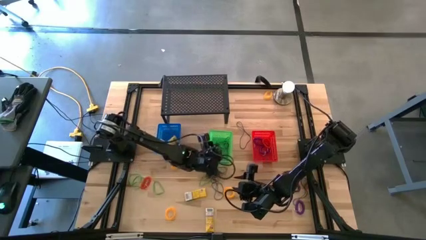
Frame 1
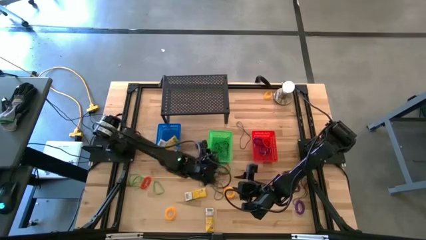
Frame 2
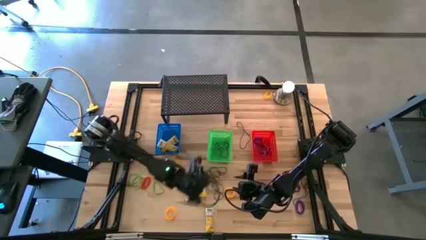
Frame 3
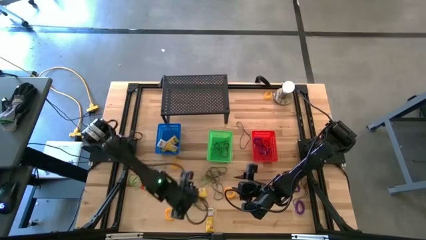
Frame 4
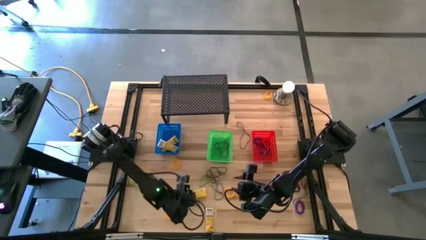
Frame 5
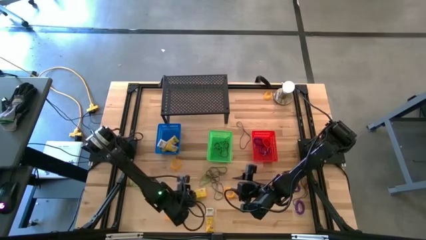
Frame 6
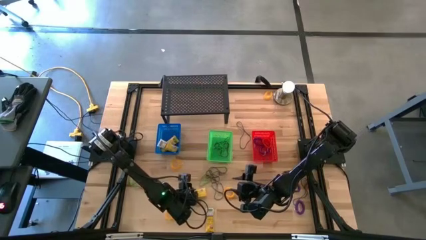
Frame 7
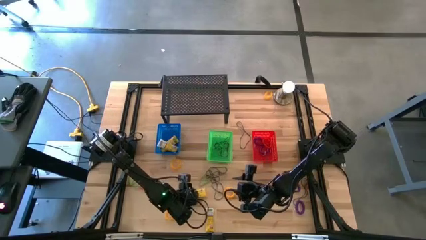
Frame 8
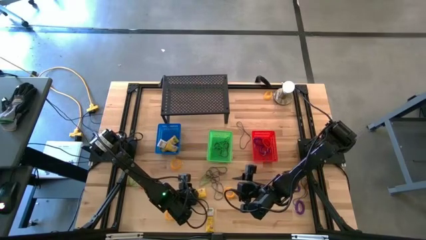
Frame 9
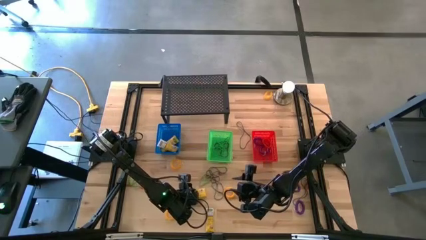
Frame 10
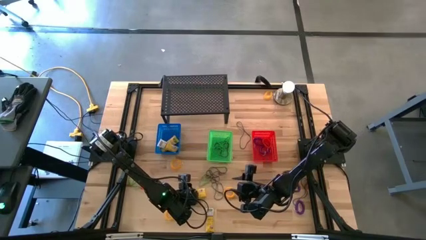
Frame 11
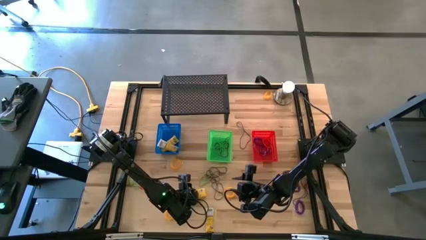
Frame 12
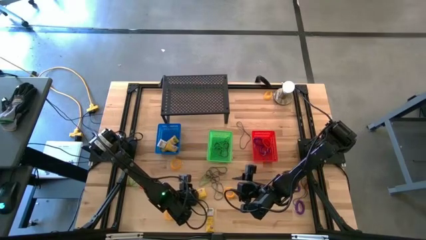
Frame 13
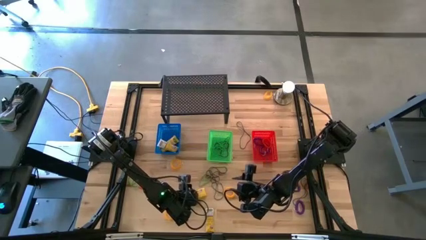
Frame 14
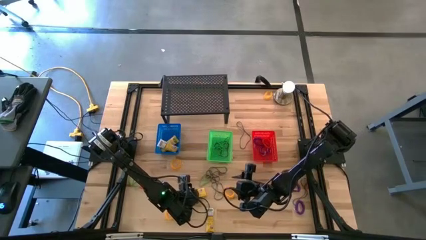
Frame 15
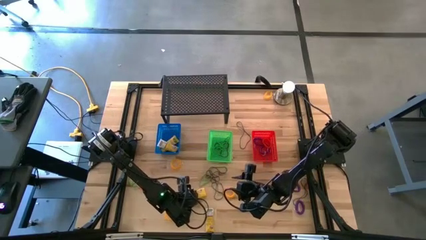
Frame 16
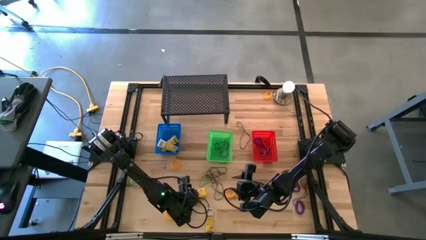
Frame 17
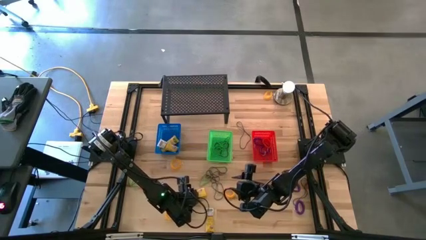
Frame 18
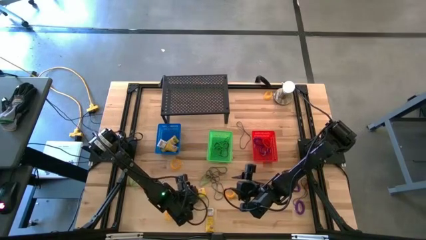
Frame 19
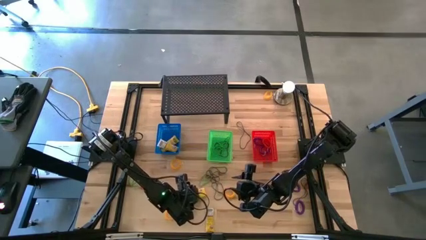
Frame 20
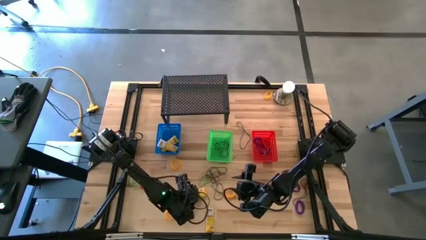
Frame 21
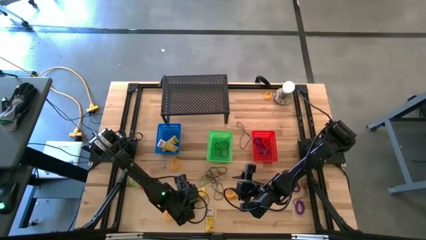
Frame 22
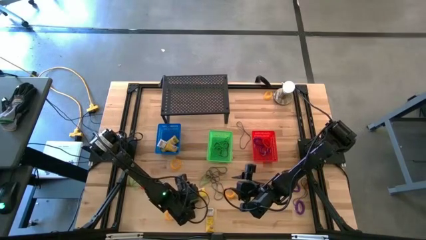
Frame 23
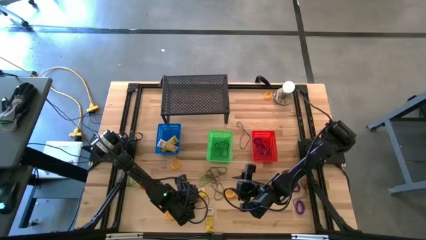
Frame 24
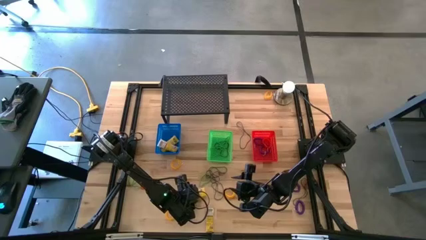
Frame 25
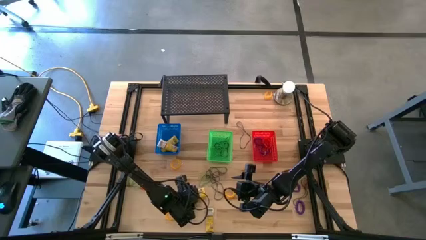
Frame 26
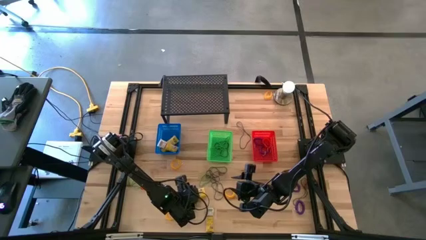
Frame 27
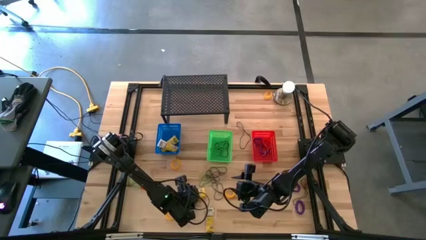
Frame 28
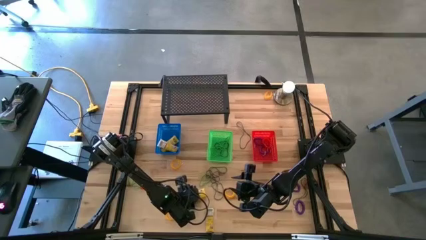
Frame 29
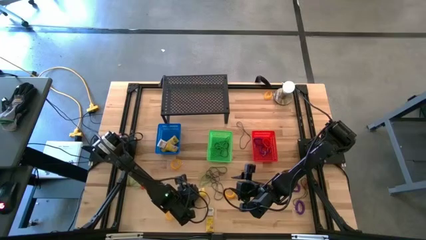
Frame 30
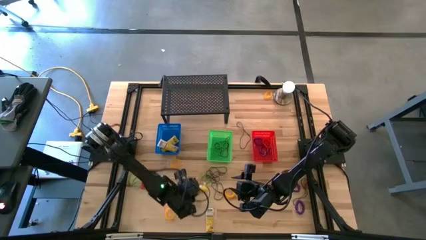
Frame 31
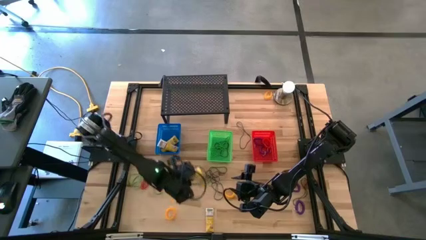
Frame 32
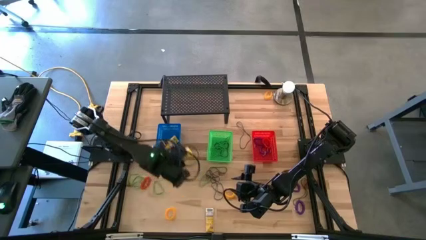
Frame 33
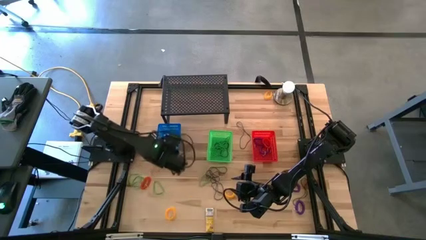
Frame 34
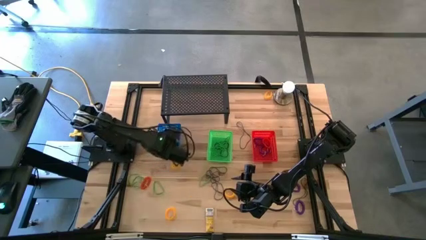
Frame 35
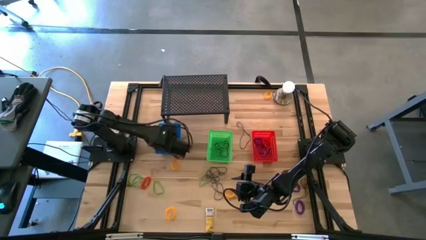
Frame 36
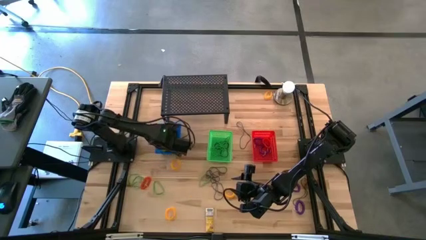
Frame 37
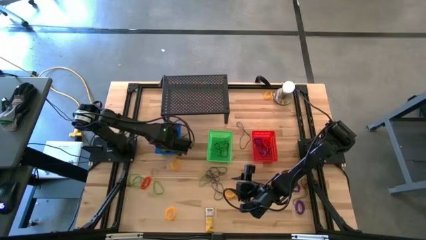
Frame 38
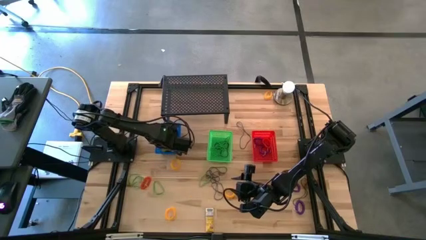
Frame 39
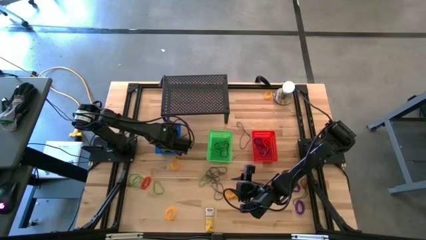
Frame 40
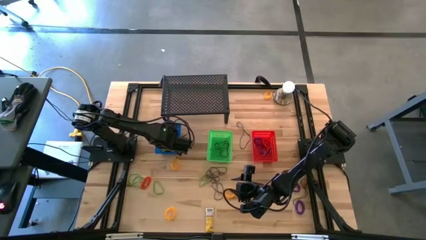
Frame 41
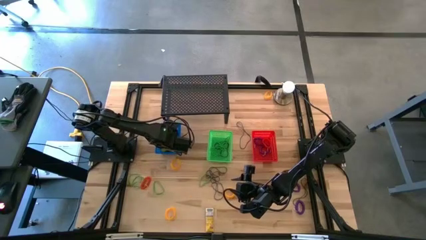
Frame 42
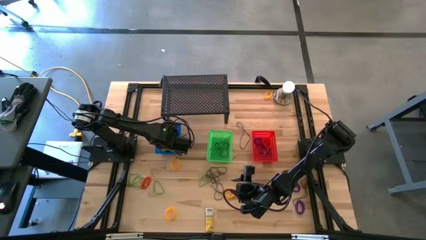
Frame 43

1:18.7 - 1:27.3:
Task: Pick & Place Office Desk Supplies
Put the crayon box into the blue bin

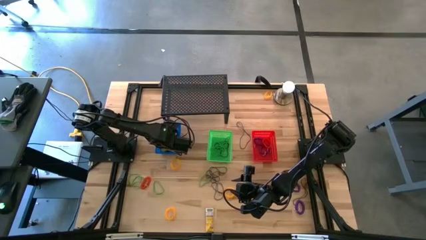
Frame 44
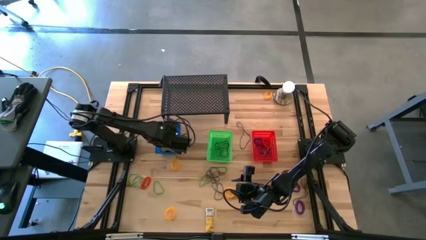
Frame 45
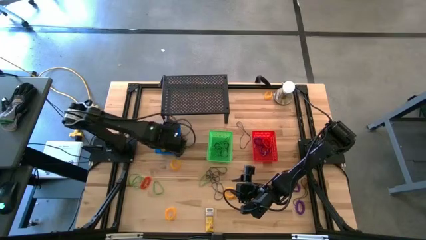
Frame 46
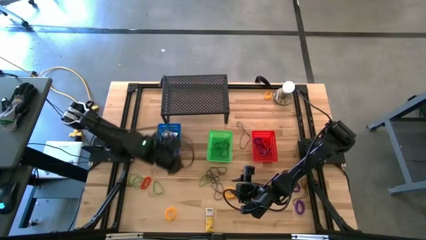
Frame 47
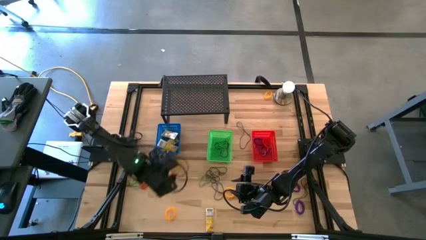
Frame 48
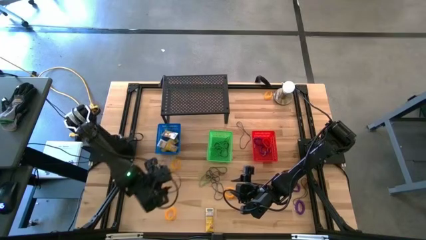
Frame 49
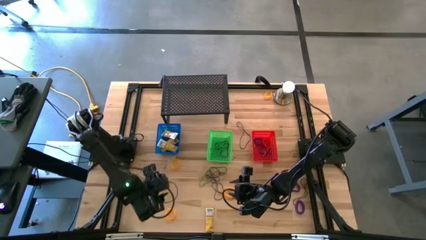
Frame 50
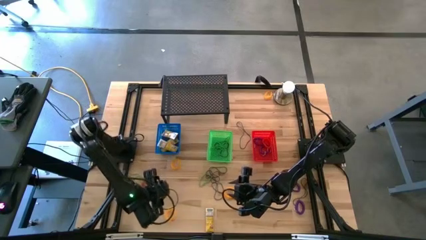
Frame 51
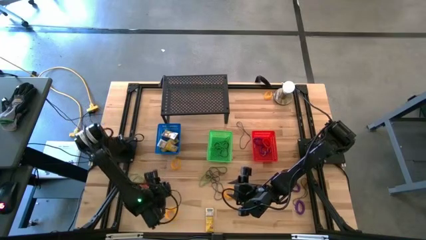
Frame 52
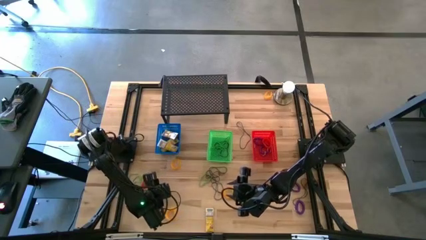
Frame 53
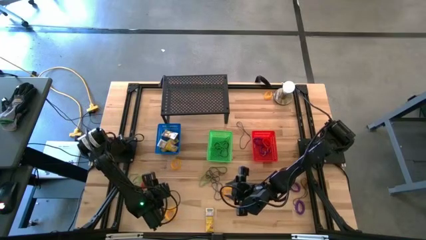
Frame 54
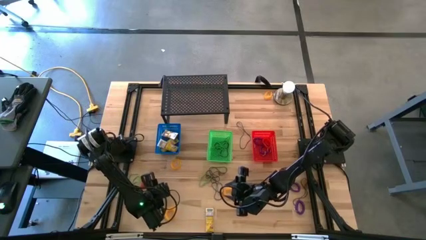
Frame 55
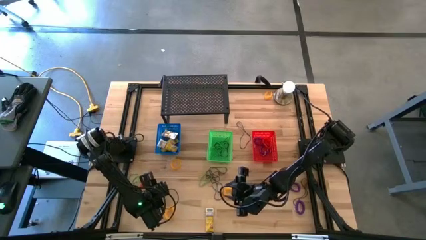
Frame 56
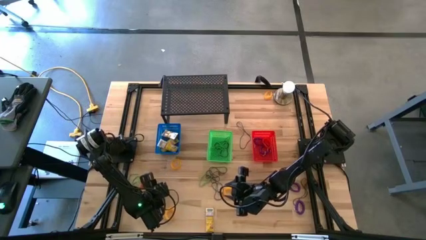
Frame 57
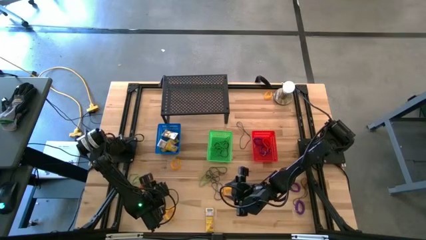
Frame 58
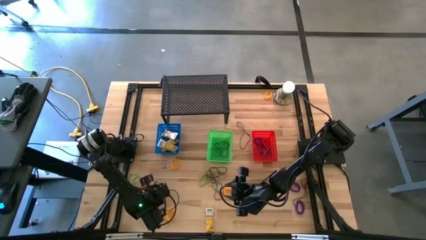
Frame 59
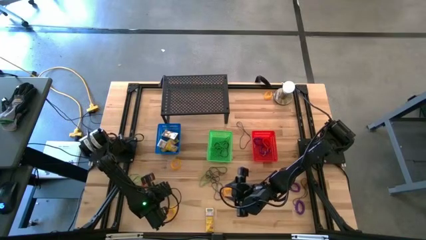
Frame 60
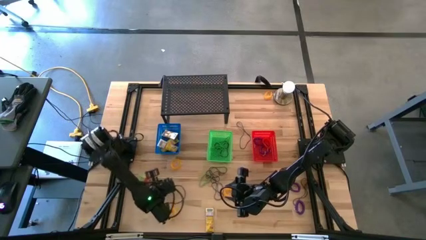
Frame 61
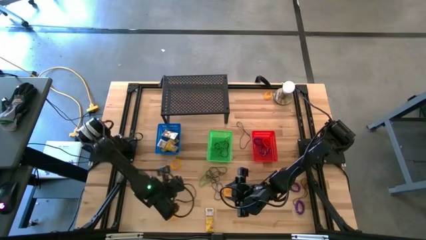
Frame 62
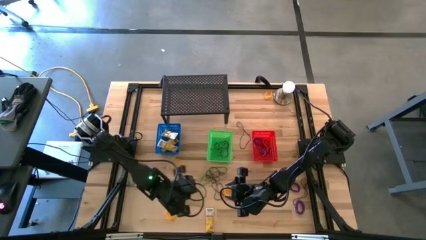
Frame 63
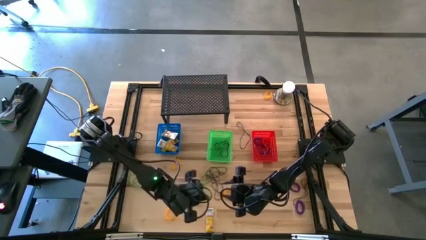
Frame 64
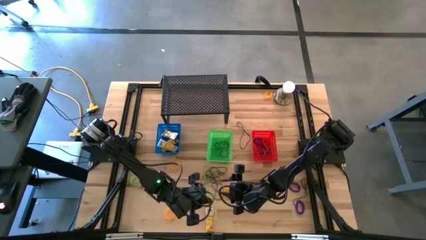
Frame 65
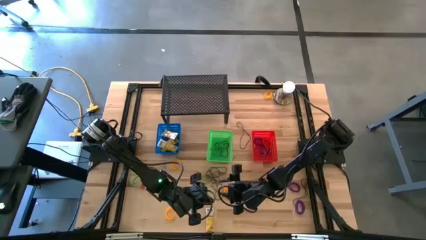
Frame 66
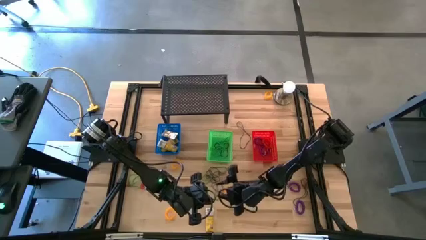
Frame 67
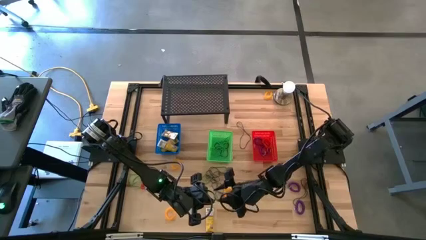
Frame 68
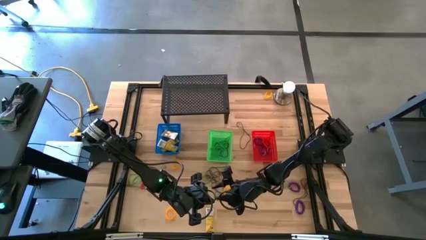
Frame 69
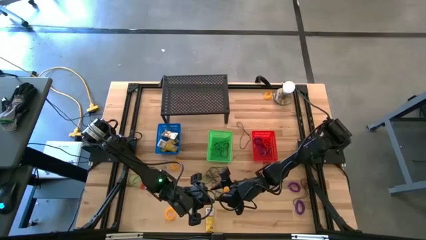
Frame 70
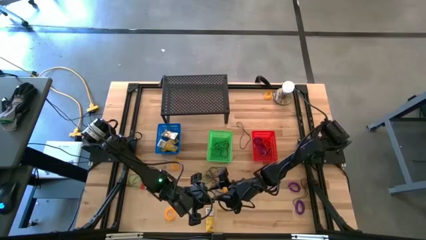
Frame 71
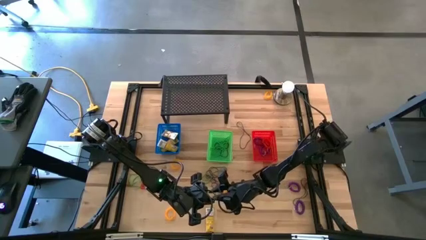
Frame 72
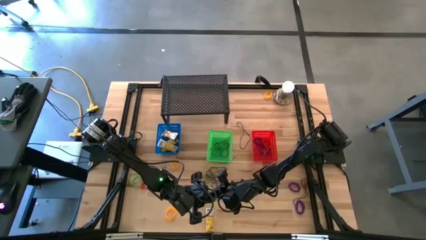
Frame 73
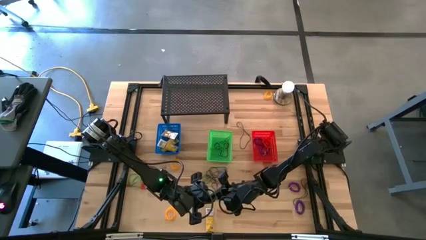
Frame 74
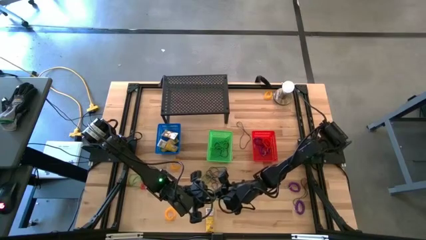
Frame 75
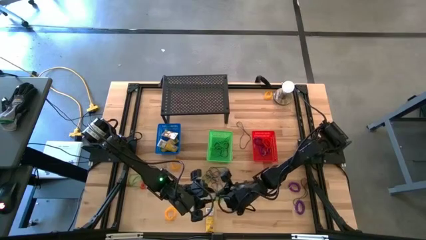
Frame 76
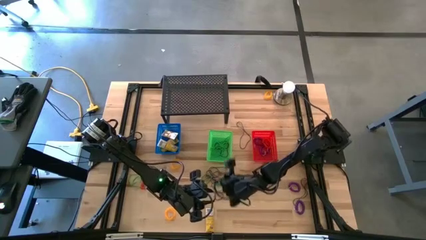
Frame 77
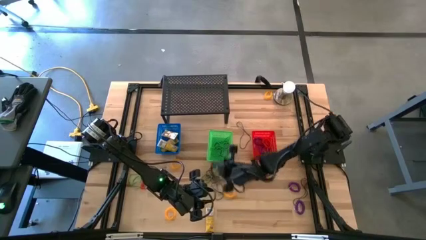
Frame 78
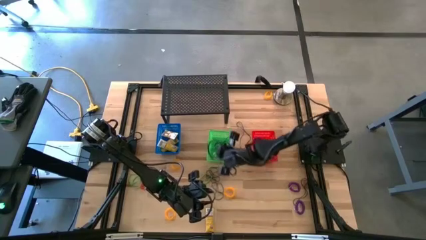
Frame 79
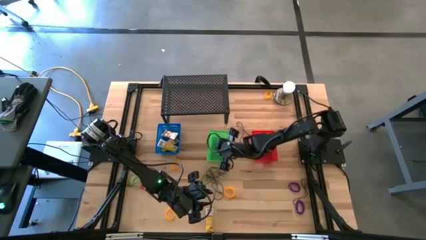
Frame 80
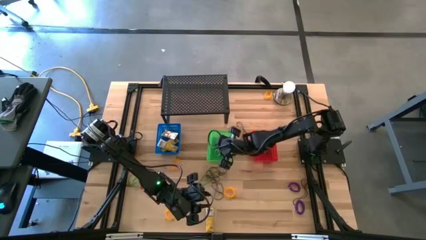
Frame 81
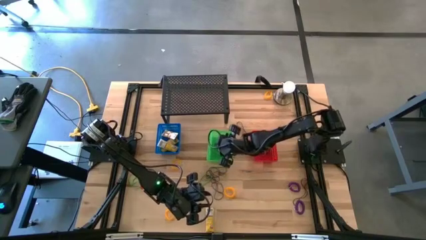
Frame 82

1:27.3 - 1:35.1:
Put the green rubber band into the green bin

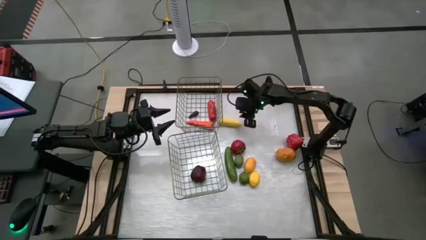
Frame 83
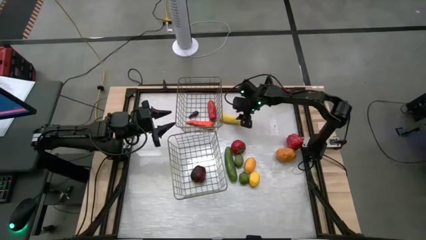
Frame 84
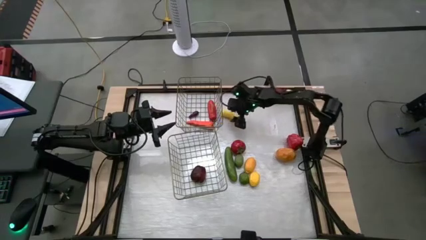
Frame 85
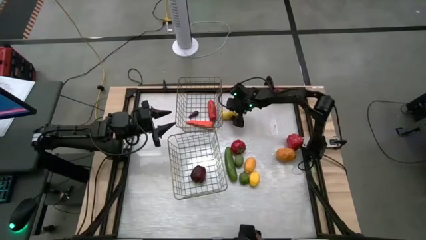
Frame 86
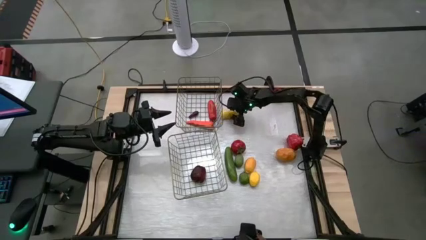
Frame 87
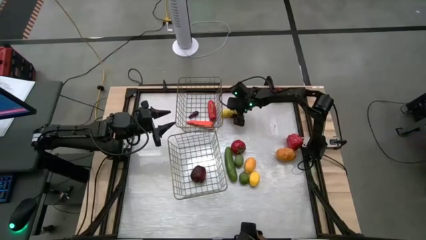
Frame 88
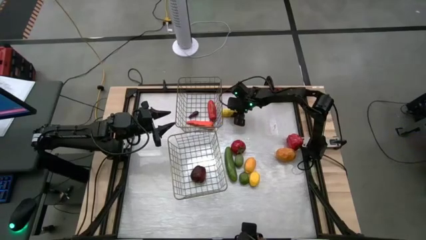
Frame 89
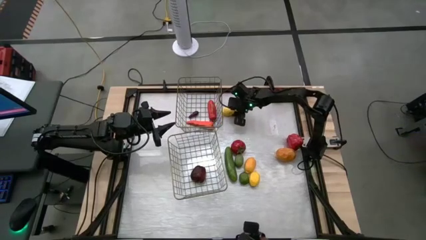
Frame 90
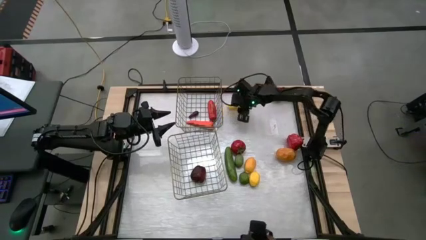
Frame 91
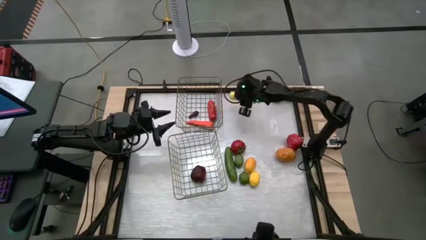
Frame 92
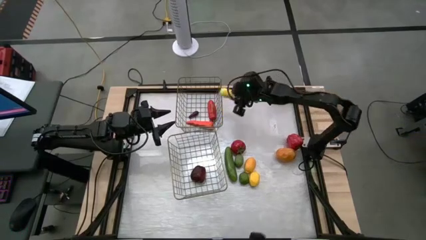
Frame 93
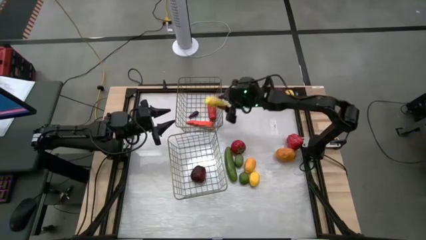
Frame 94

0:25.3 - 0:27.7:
Task: Sort produce into baskets
Put the yellow corn into the top basket
